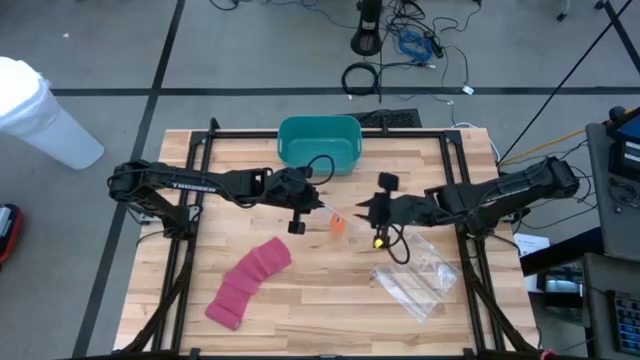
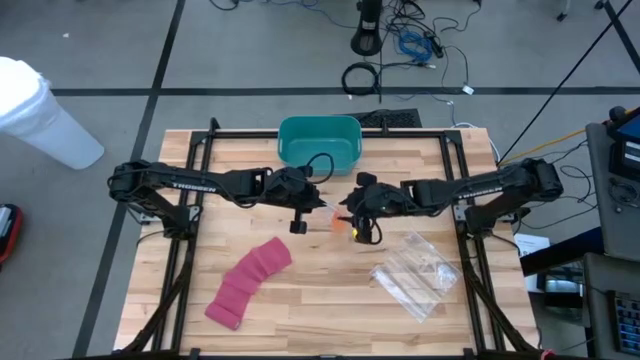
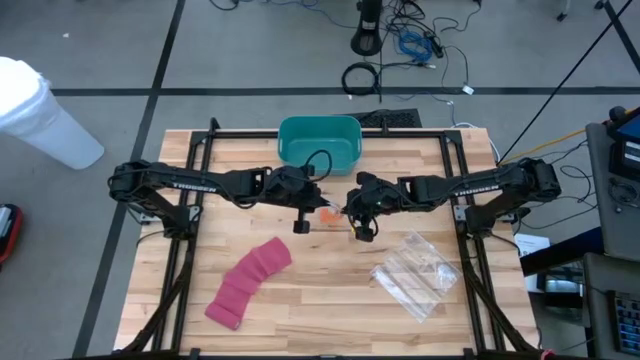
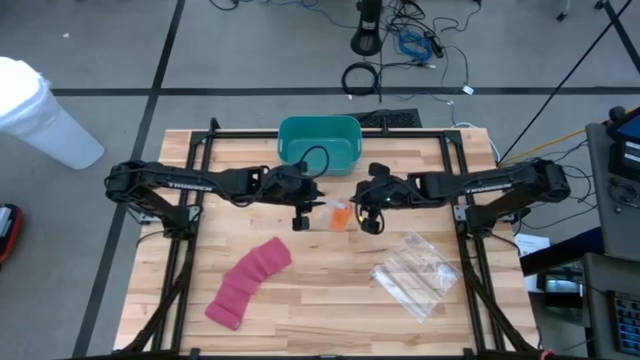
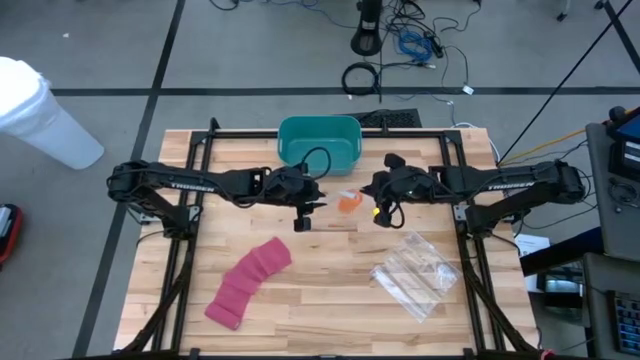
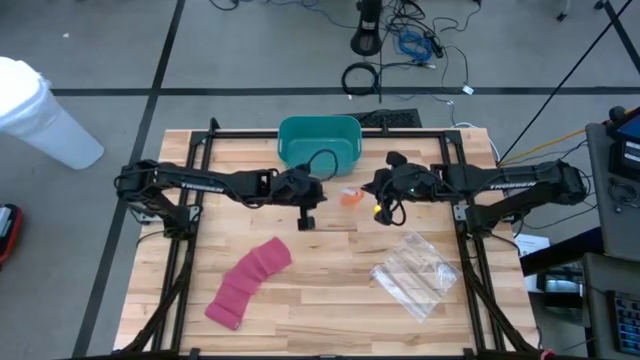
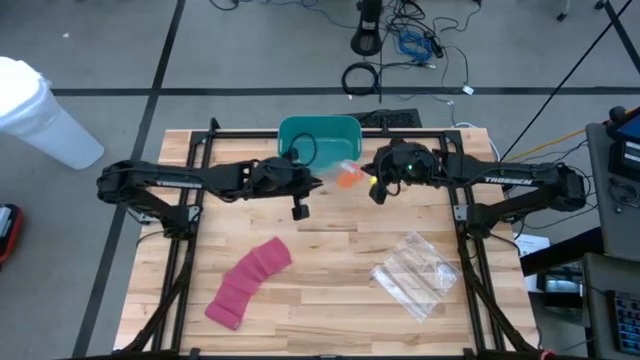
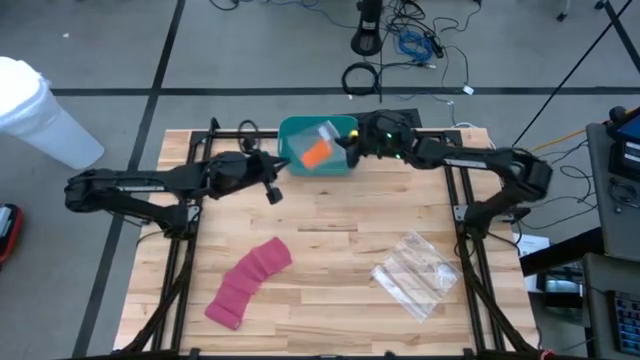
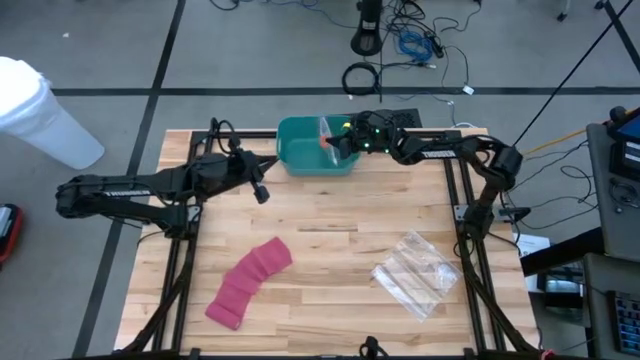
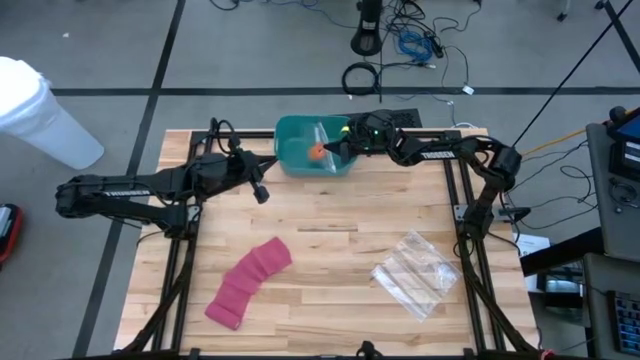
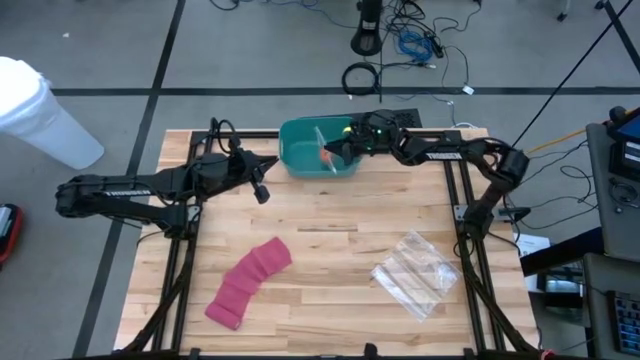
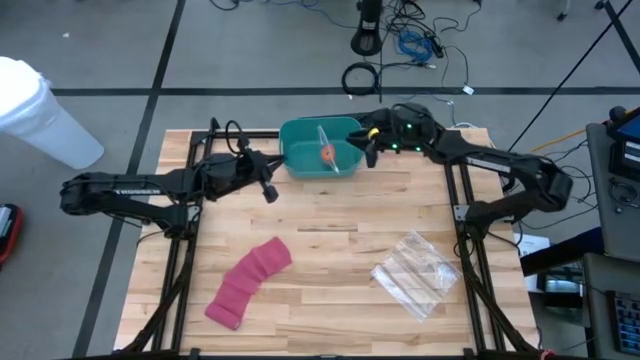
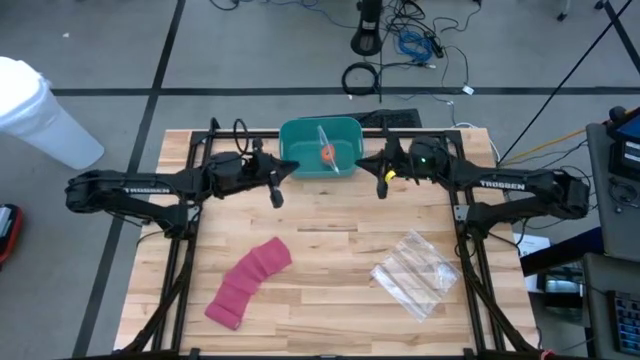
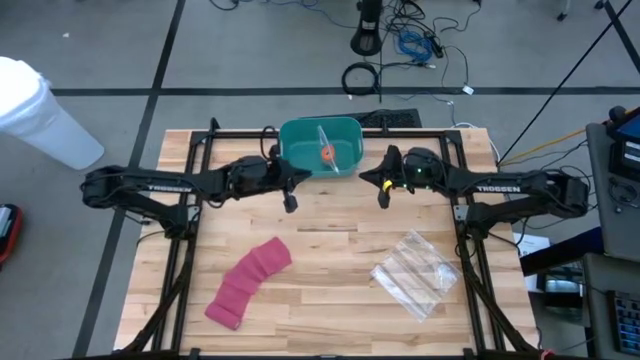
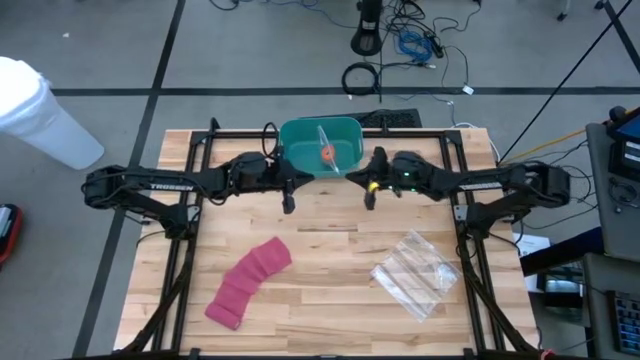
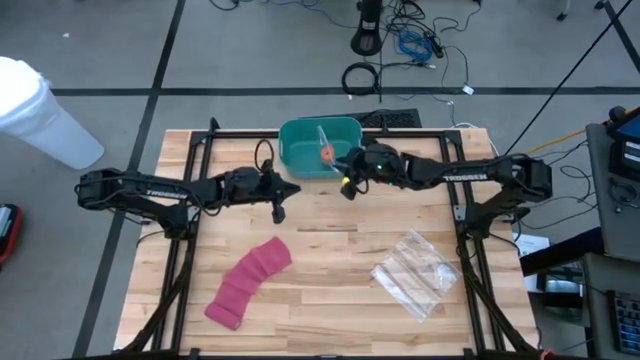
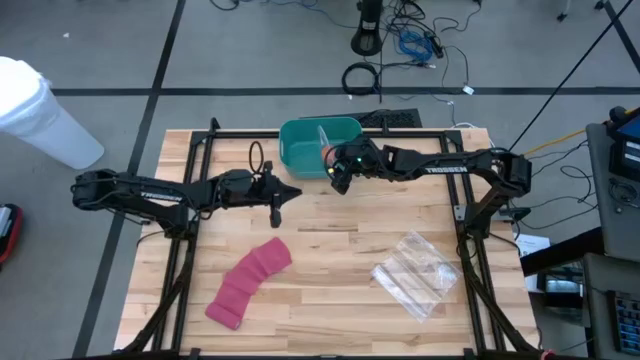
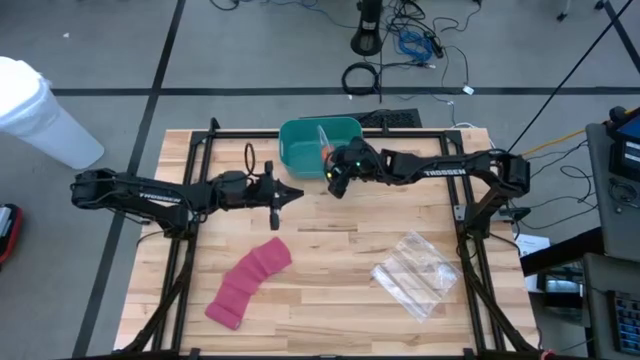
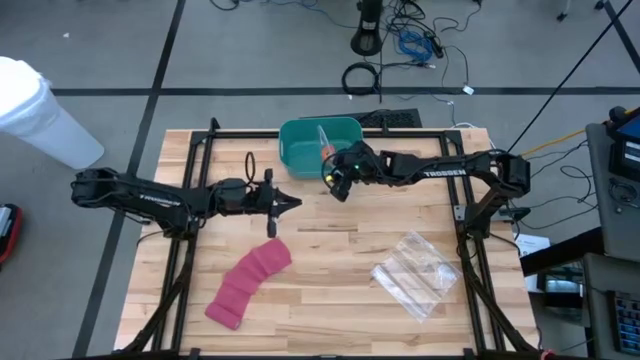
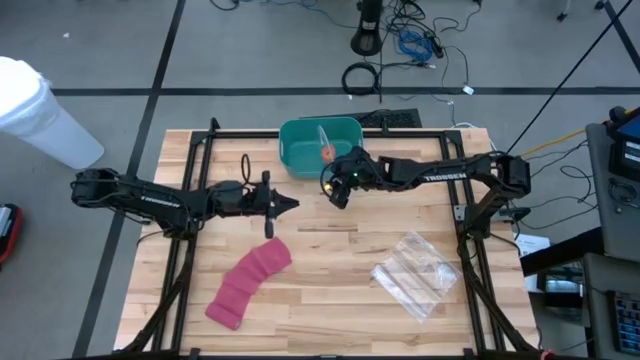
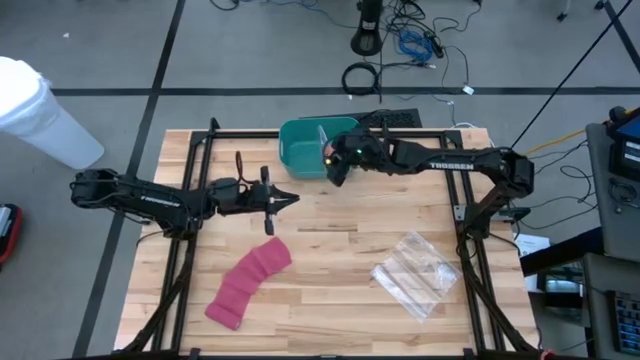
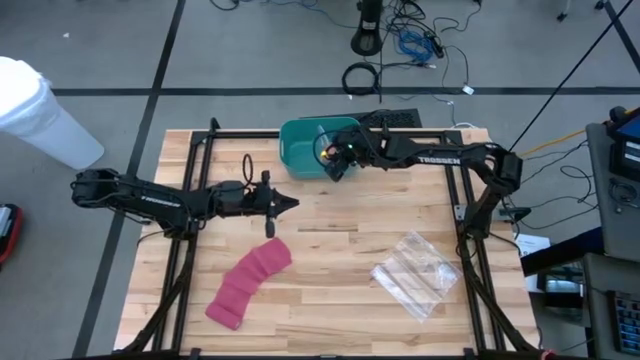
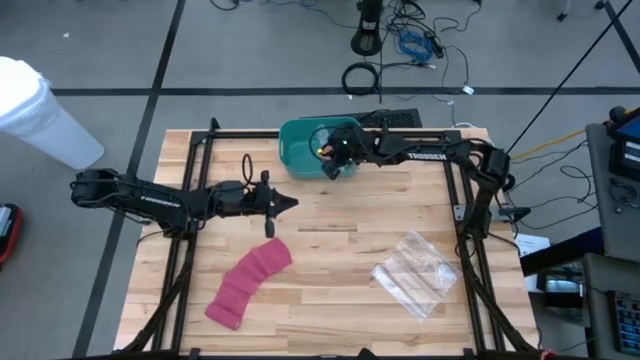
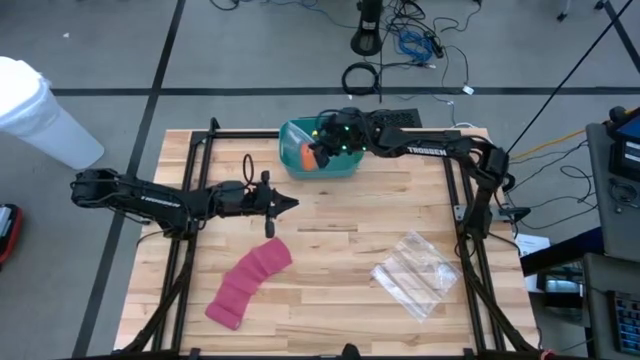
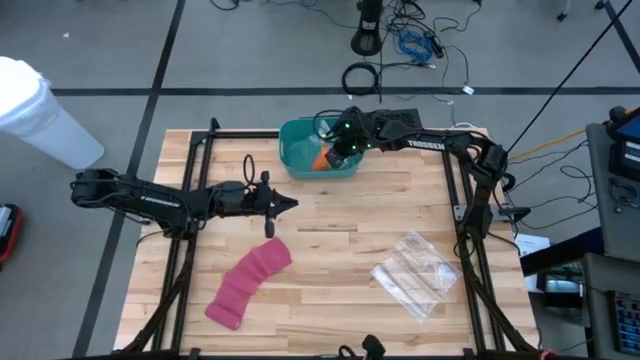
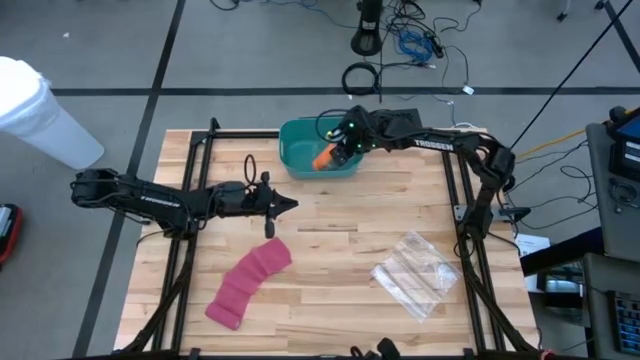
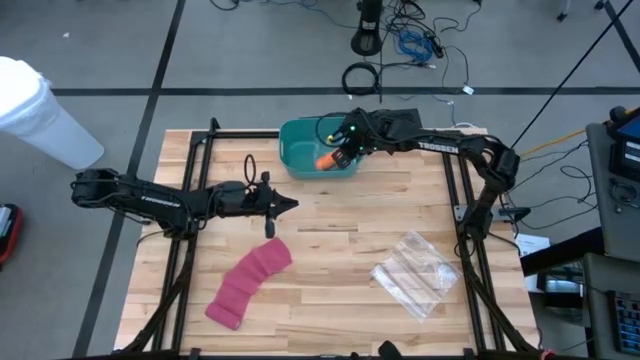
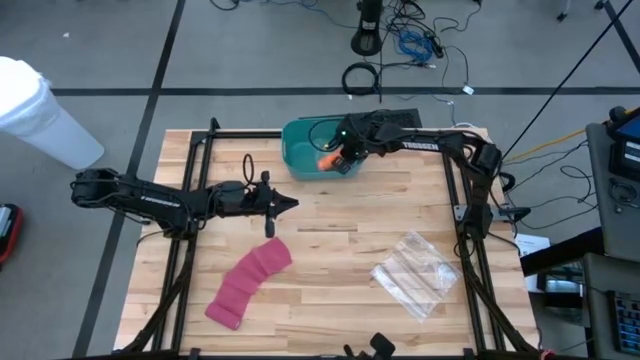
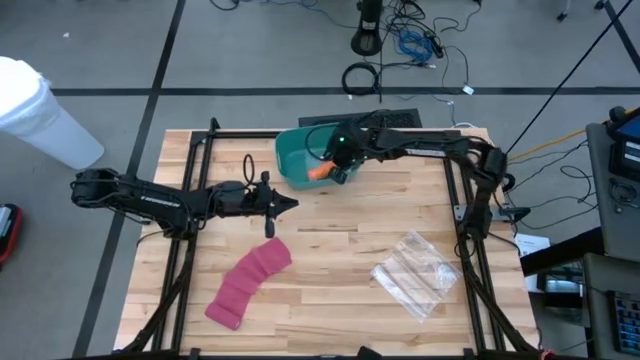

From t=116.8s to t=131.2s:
Task: Roll bandage
Put the transparent zip bag into the green bin
